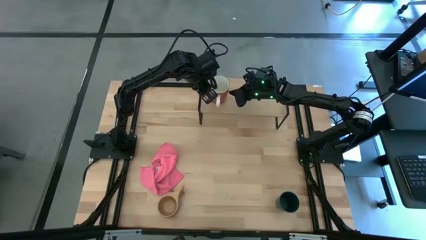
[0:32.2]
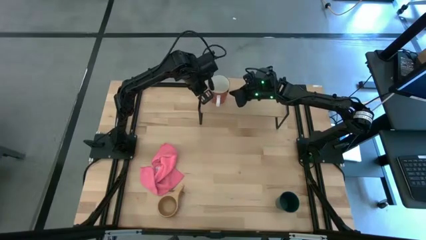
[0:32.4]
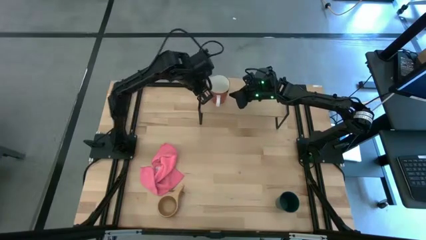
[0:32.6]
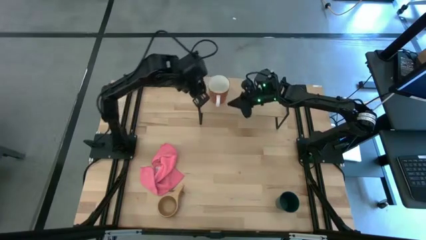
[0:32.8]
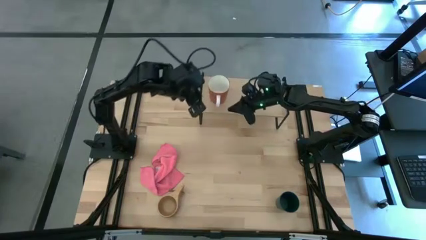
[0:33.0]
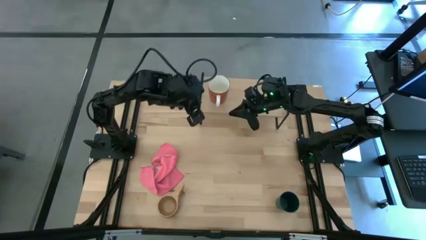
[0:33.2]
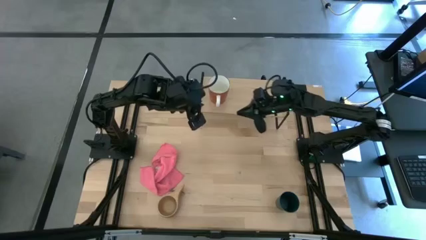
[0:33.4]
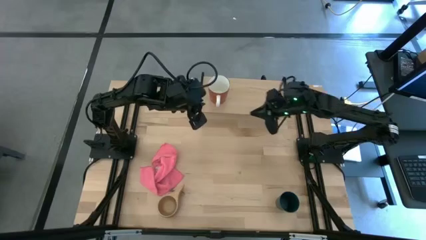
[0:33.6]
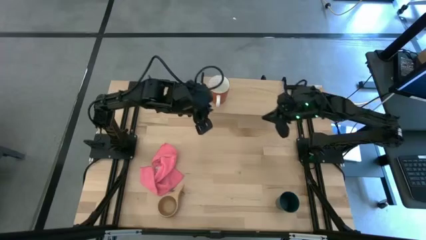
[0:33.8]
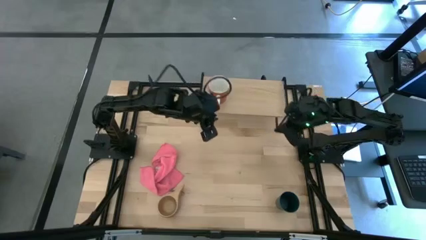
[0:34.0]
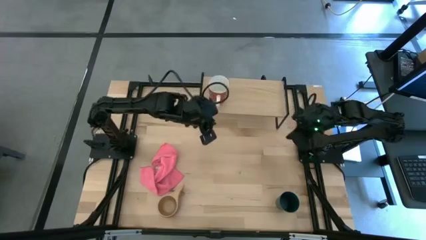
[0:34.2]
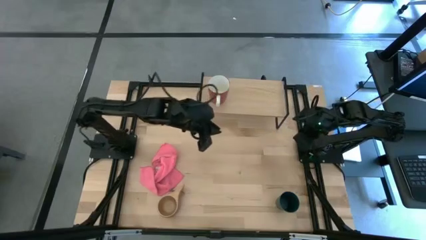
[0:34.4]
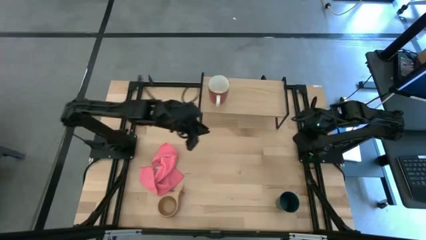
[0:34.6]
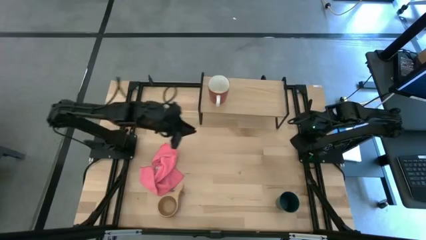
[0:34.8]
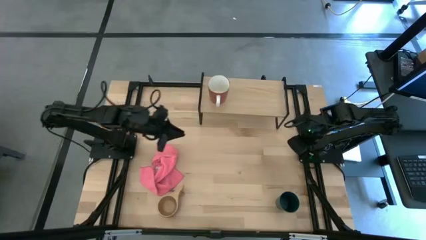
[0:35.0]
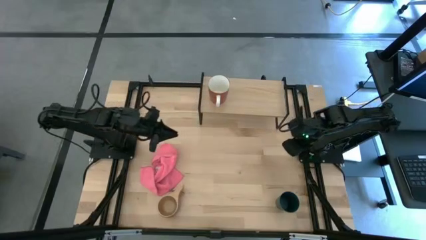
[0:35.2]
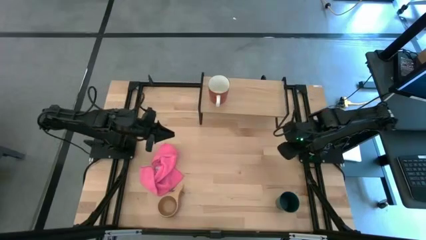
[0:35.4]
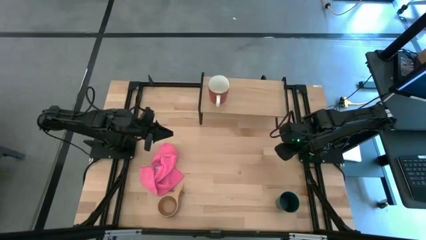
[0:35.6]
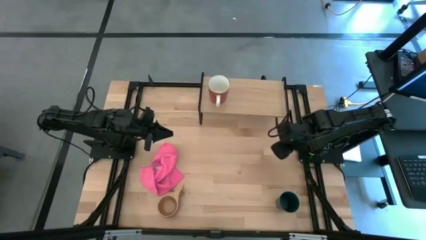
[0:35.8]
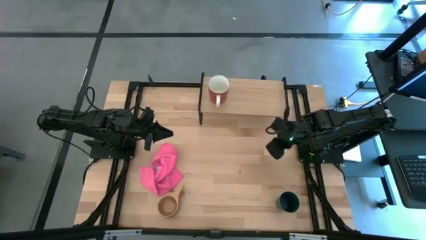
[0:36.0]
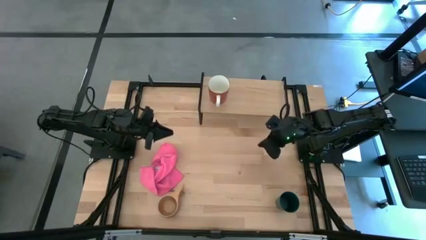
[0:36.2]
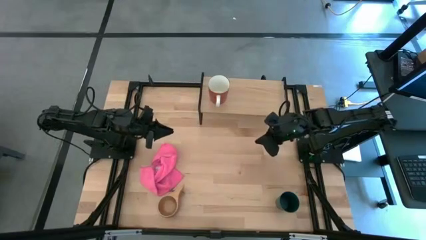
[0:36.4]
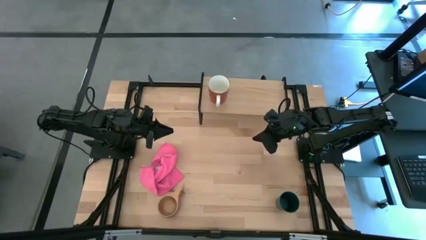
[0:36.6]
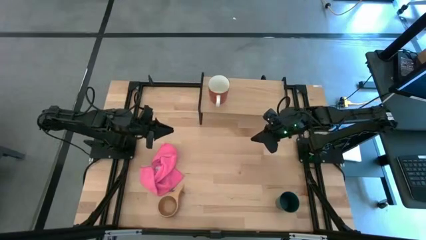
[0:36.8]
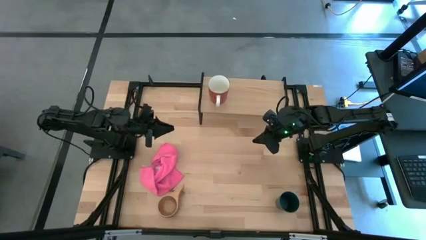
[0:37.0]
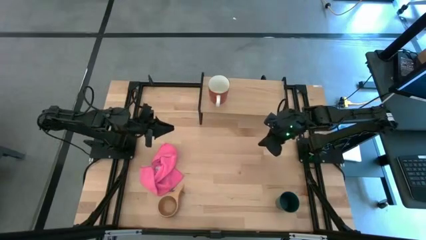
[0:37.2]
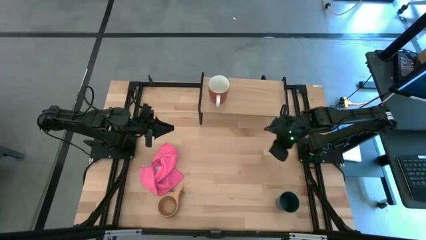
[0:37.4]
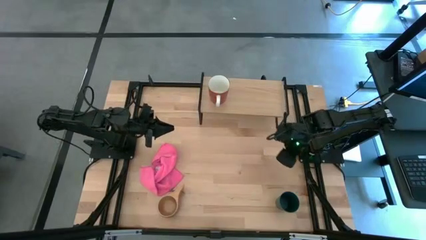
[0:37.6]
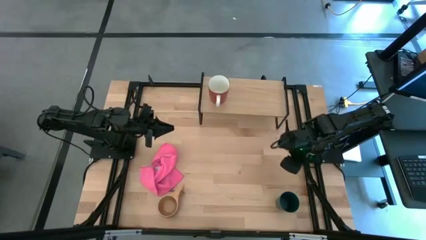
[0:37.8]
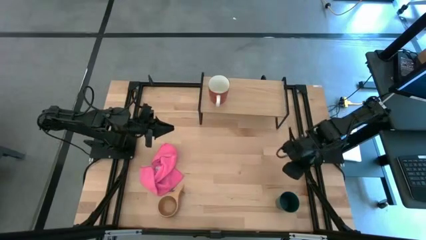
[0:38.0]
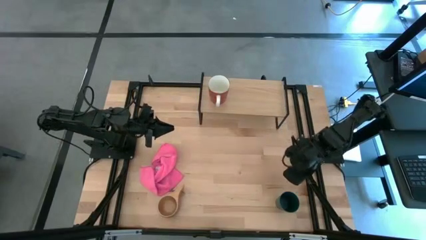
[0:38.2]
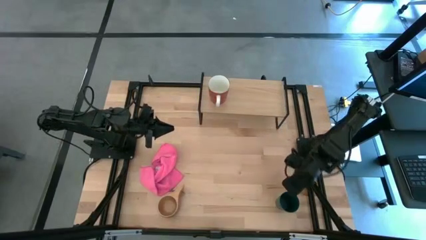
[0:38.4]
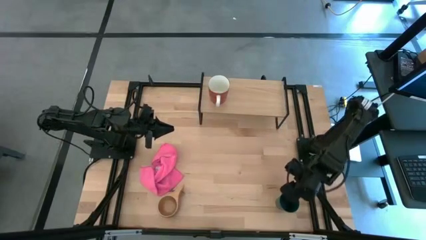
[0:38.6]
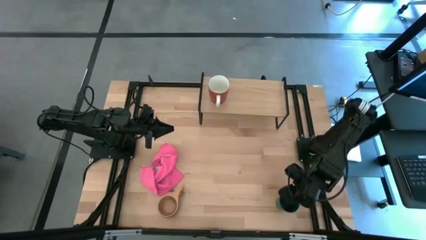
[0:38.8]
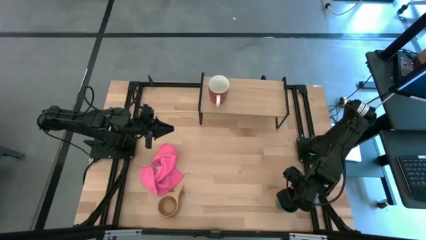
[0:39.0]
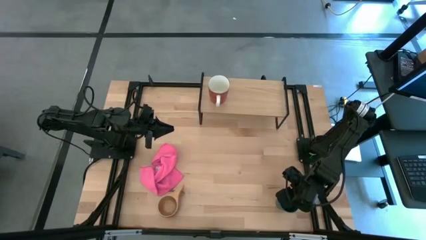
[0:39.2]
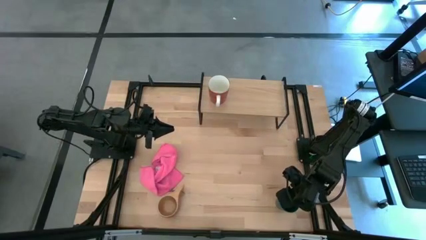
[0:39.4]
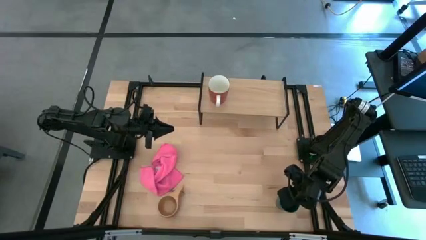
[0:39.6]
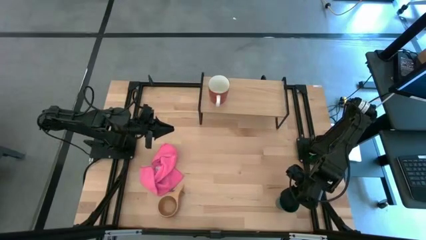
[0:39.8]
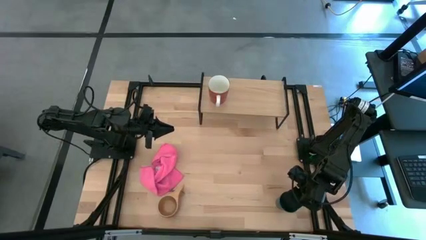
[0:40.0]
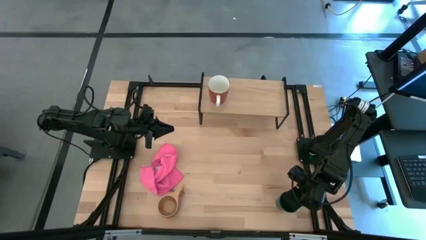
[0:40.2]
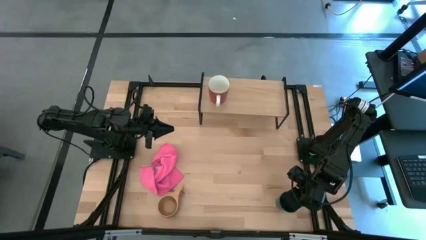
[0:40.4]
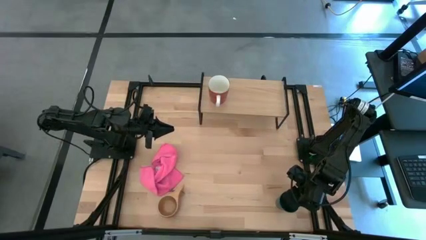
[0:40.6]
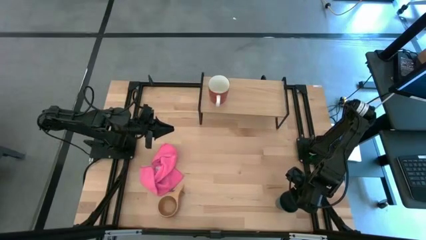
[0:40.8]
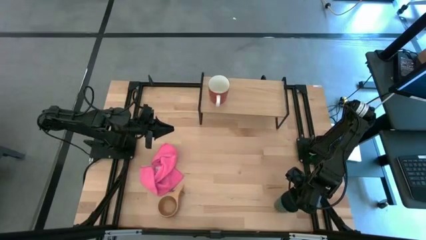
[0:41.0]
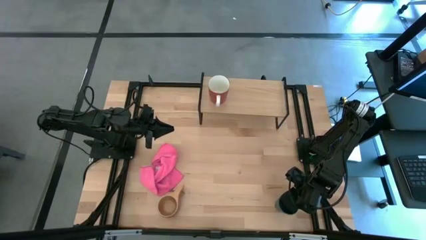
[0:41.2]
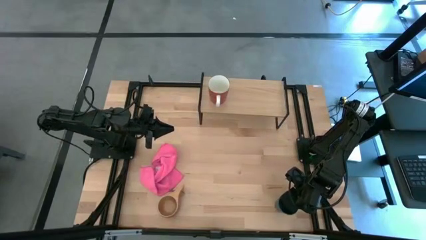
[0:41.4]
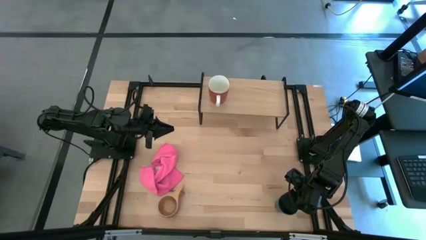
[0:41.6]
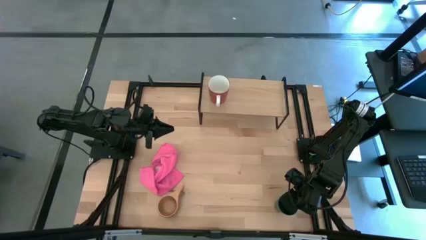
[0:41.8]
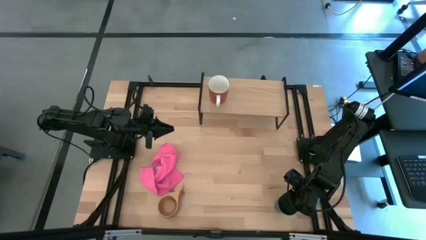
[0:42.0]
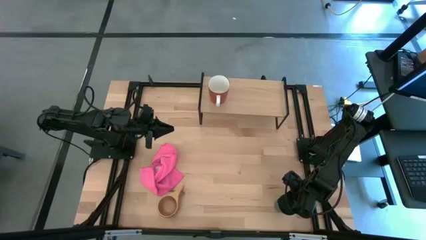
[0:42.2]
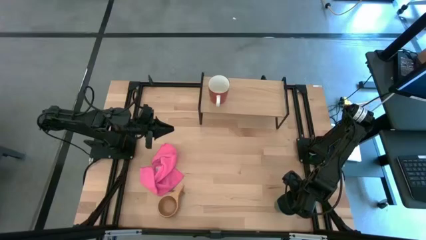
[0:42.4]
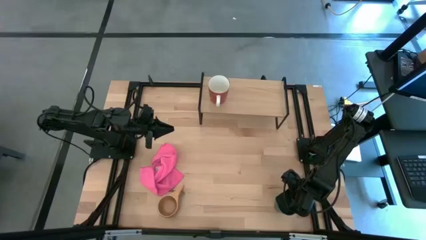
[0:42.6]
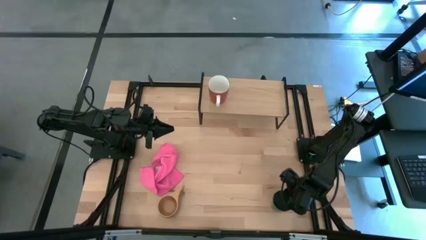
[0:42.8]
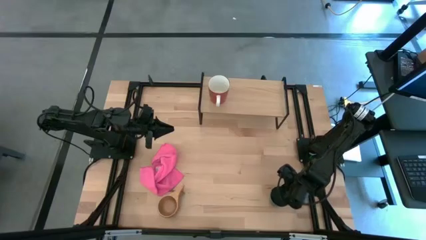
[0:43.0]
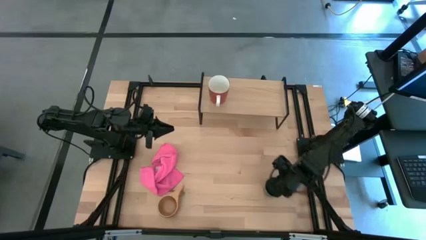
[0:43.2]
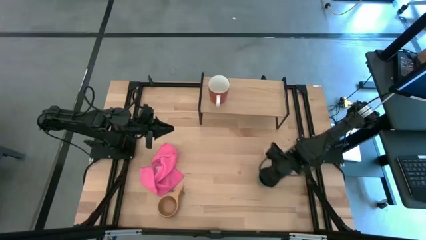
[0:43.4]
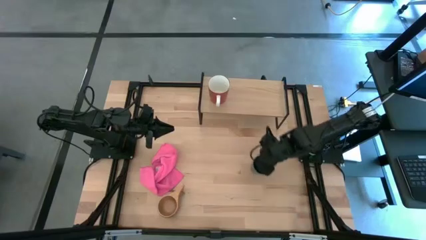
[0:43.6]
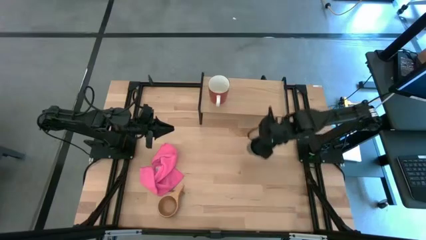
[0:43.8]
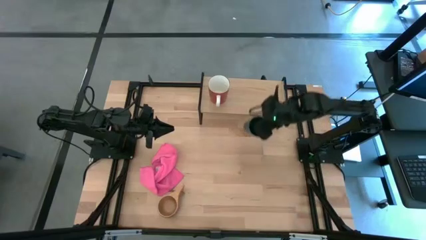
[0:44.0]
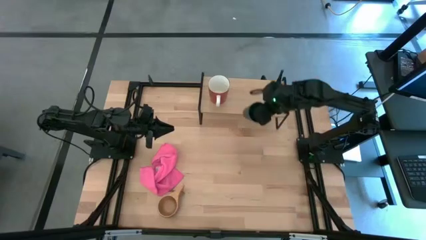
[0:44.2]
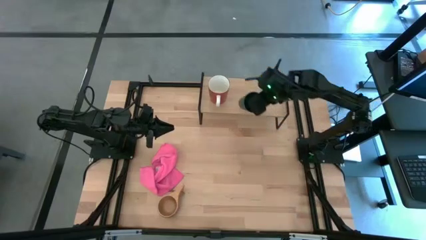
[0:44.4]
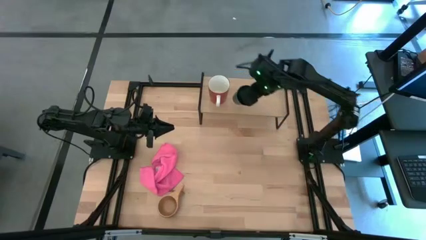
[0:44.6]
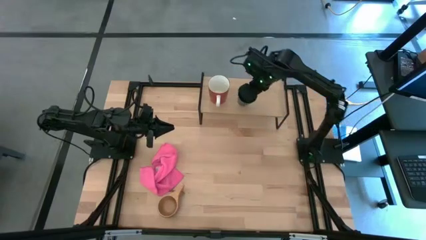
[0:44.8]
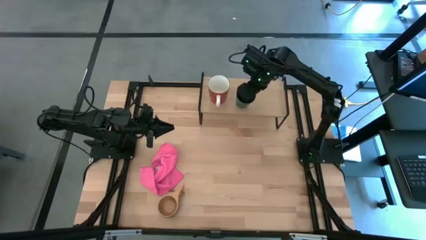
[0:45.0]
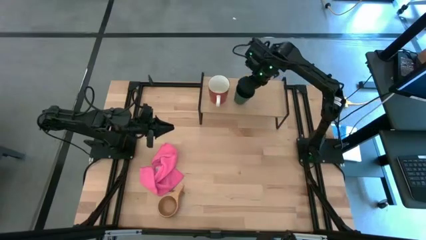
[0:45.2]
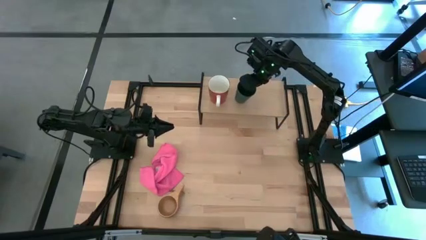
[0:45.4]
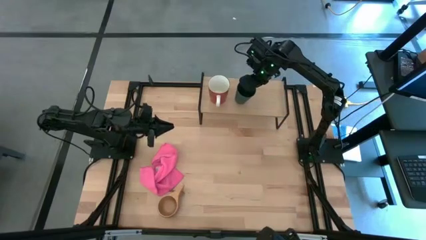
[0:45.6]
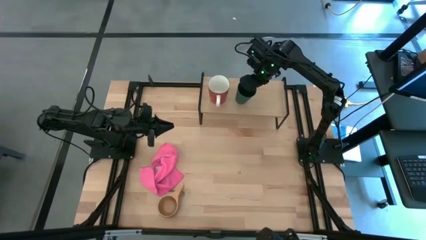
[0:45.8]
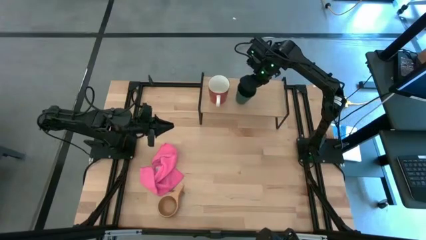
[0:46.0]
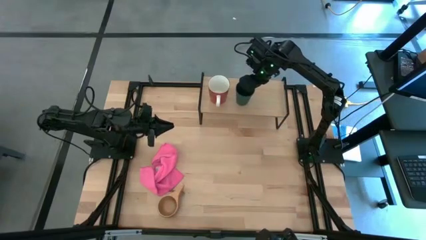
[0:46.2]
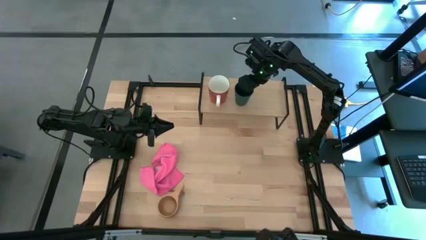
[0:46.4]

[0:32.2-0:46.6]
Task: Stack small to large cups/mugs on shelf
Put the blue mug on the shelf
